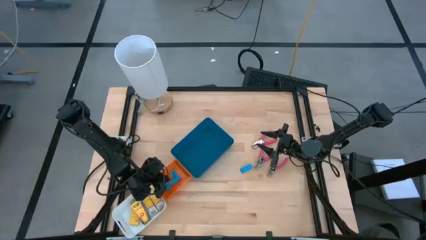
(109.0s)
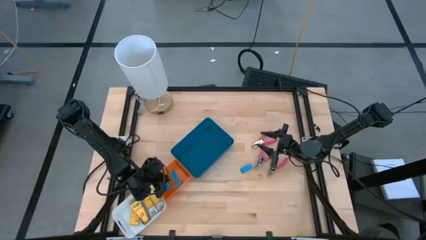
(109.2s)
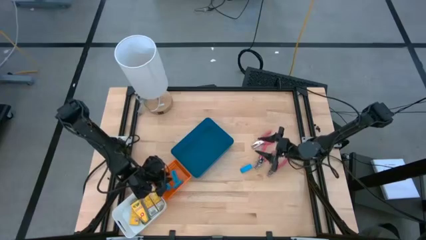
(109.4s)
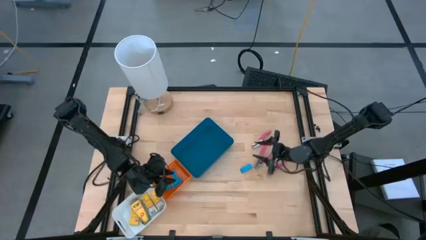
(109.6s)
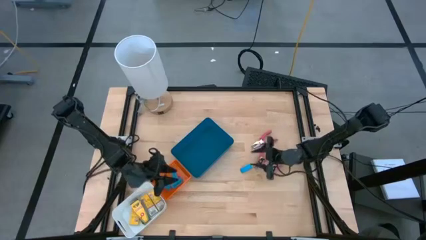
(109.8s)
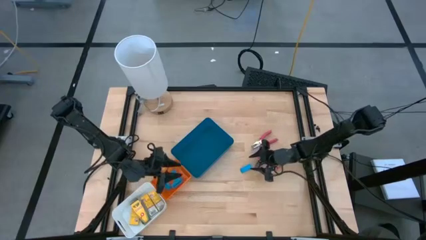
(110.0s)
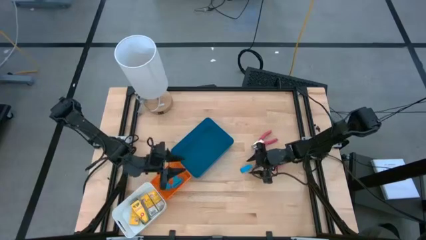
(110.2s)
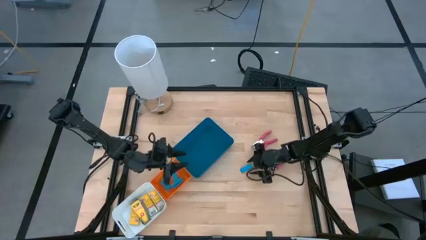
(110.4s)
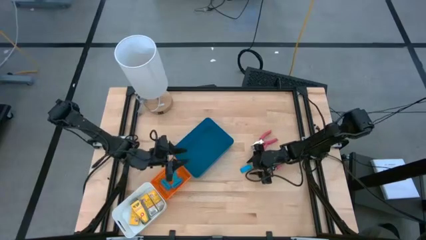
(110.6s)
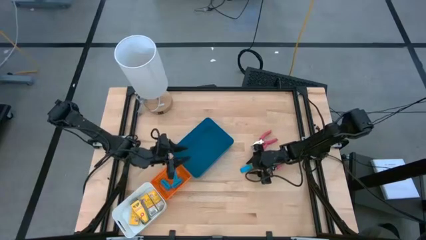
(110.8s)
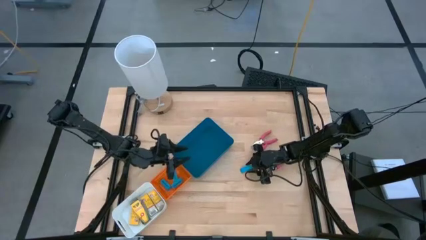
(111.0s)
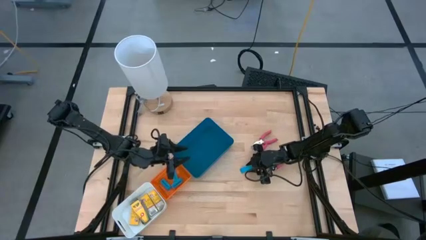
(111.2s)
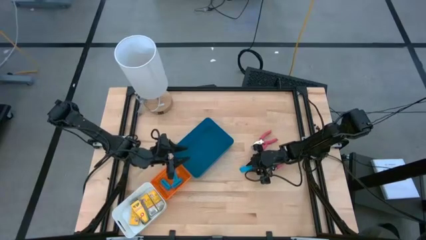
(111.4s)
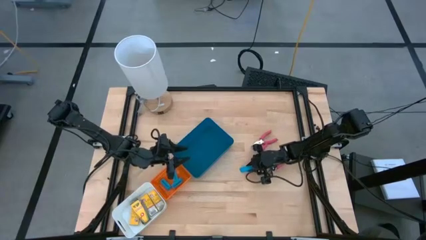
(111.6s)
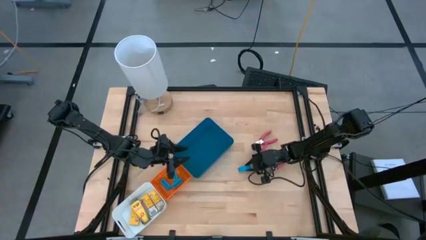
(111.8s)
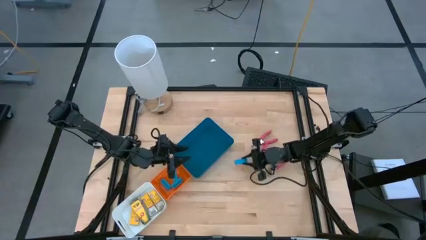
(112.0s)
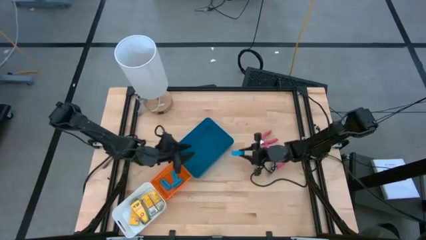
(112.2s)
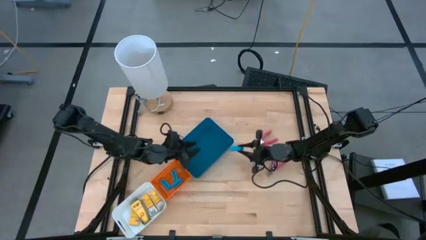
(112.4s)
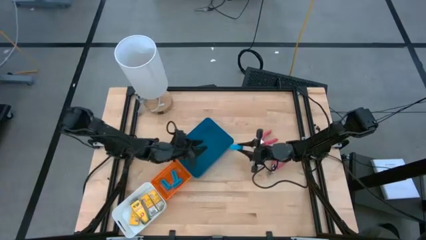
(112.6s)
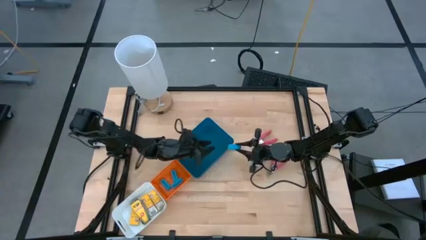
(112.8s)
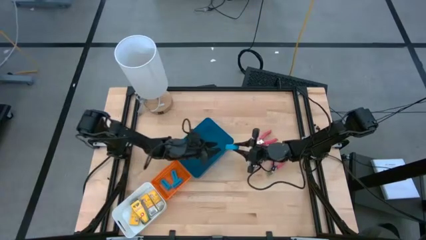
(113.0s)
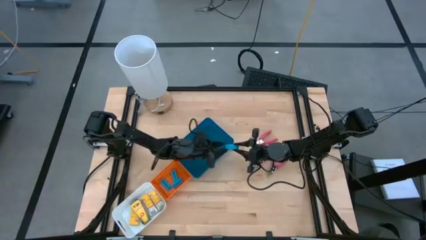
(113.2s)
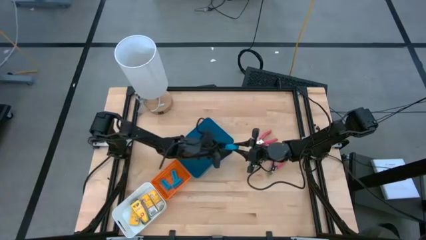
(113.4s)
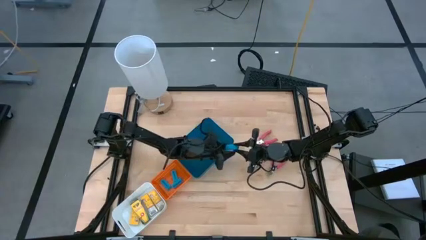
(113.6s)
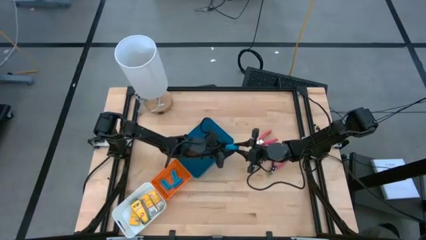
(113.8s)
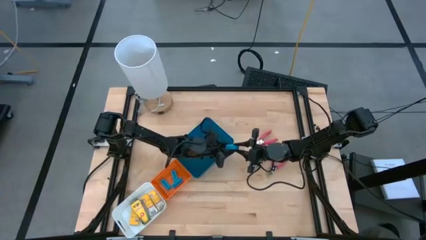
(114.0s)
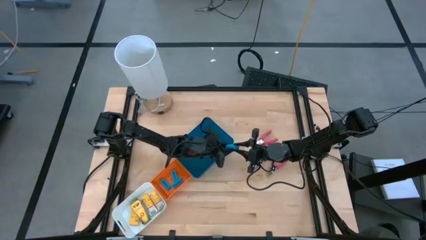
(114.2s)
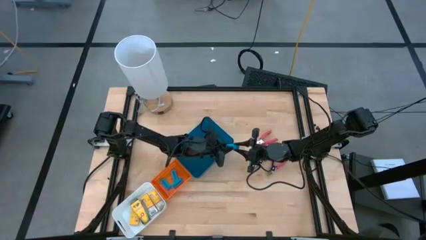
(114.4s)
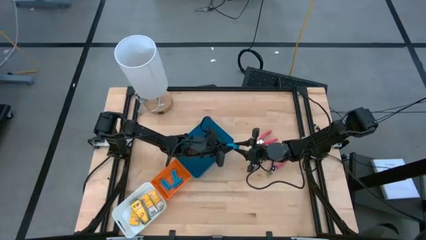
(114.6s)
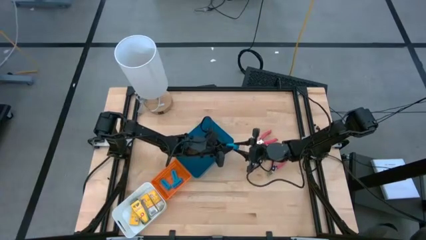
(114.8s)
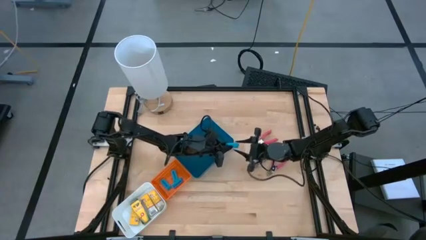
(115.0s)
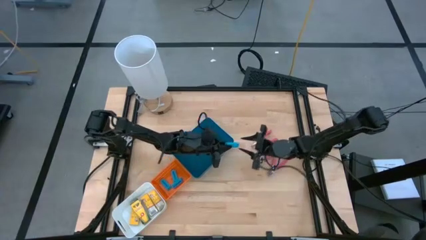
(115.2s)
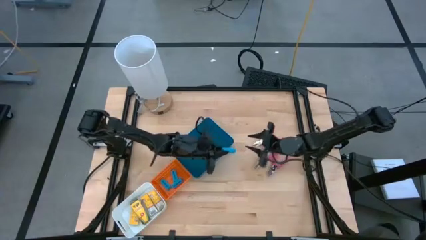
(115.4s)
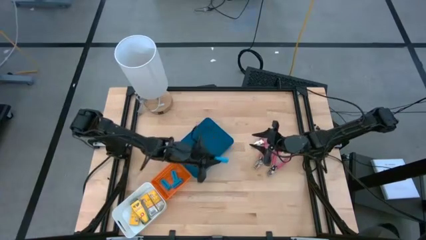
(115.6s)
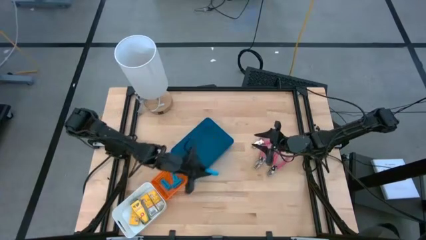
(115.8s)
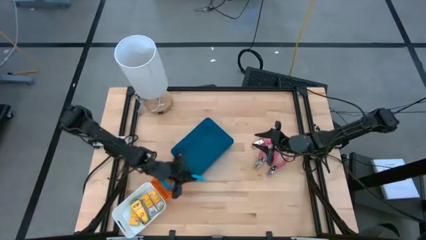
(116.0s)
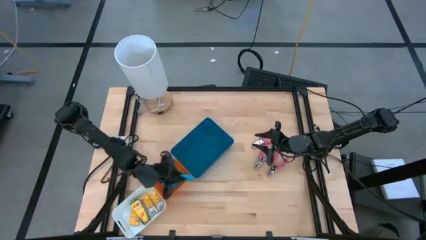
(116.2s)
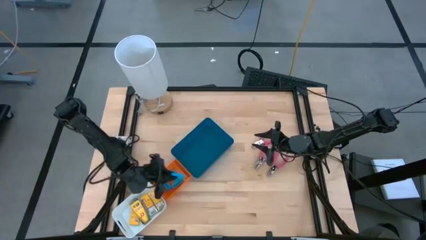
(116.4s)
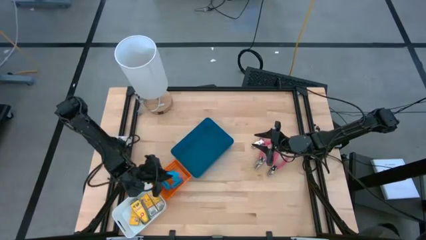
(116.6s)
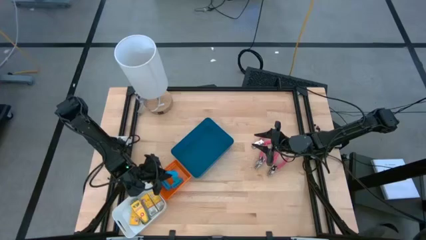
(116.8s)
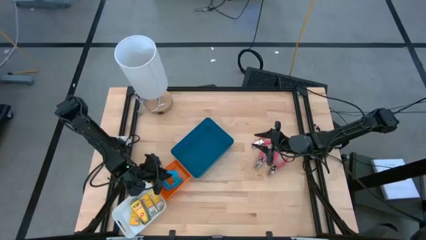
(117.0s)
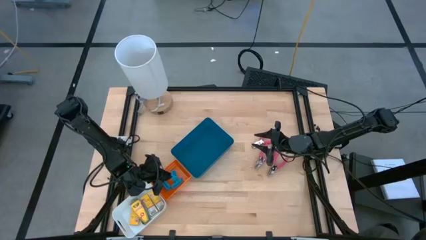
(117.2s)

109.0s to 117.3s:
Task: Pick & Place School Supplies
Put the blue eraser into the orange bin

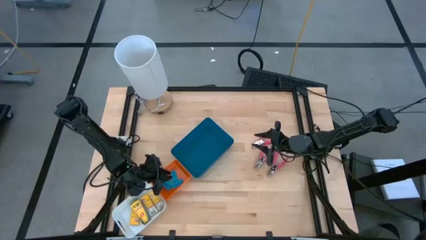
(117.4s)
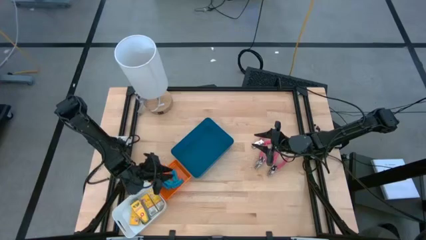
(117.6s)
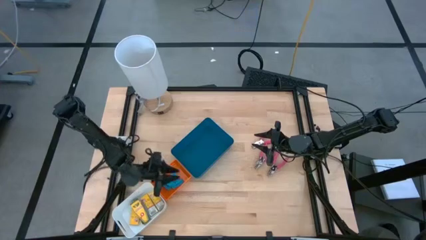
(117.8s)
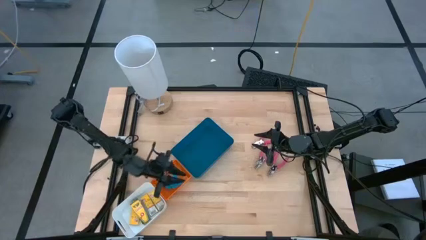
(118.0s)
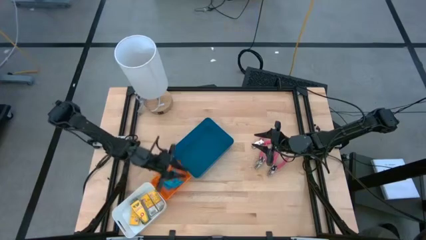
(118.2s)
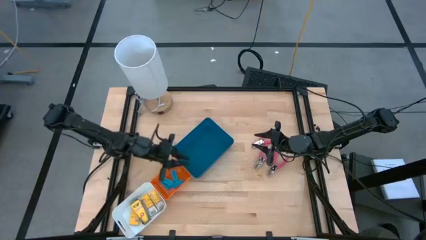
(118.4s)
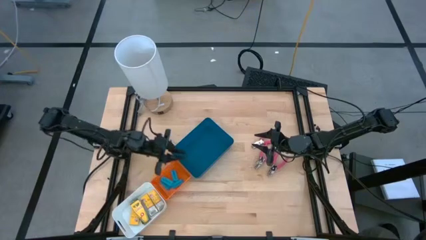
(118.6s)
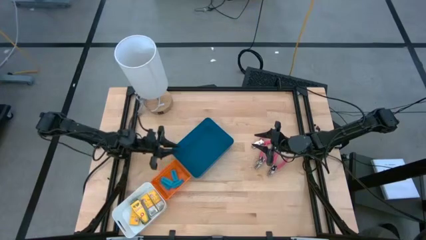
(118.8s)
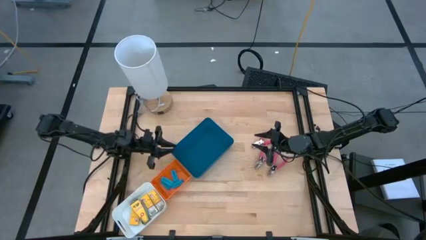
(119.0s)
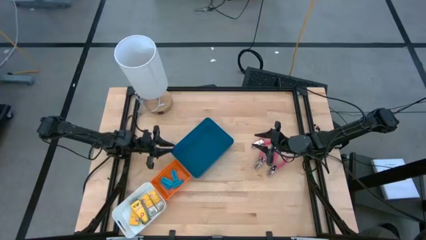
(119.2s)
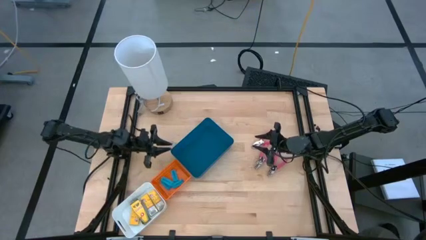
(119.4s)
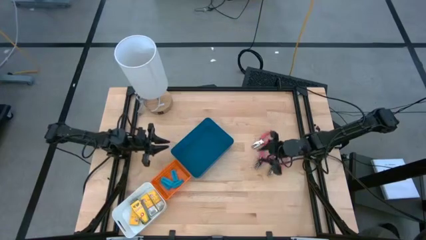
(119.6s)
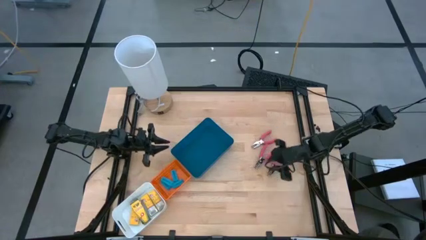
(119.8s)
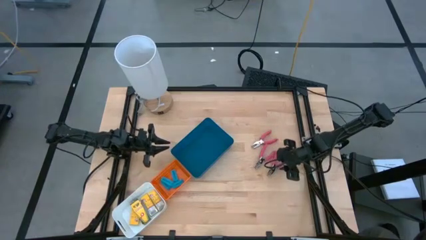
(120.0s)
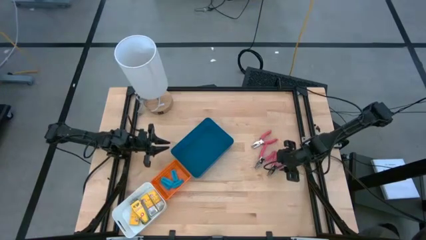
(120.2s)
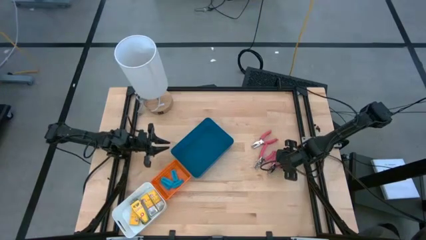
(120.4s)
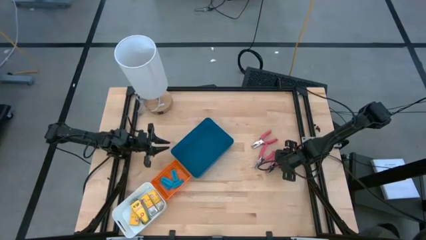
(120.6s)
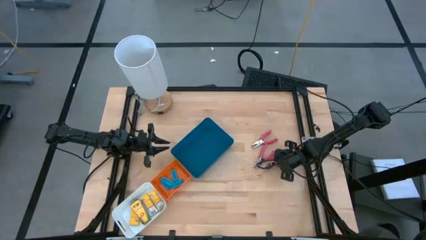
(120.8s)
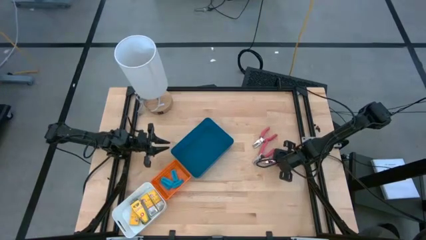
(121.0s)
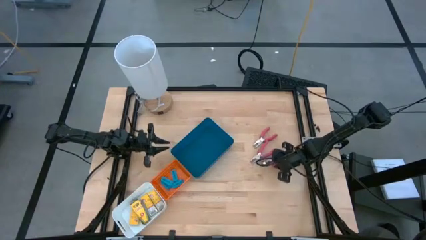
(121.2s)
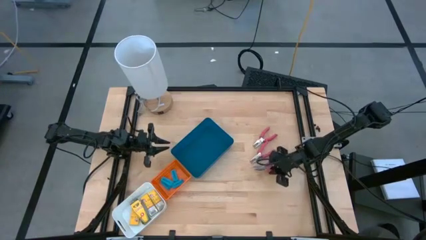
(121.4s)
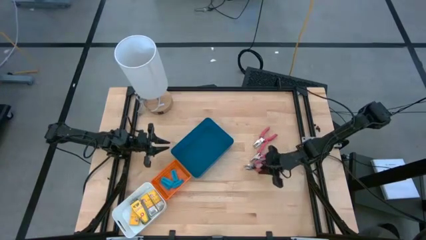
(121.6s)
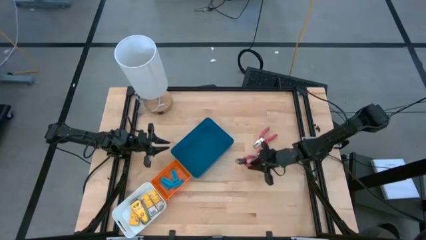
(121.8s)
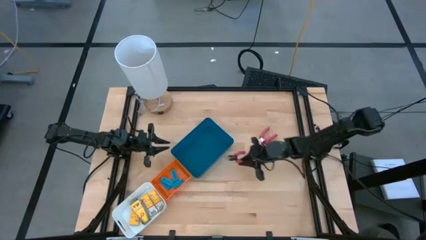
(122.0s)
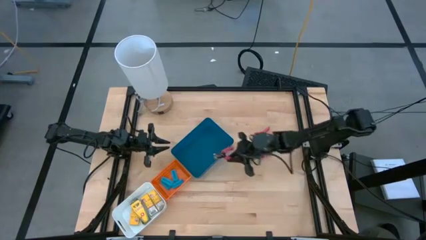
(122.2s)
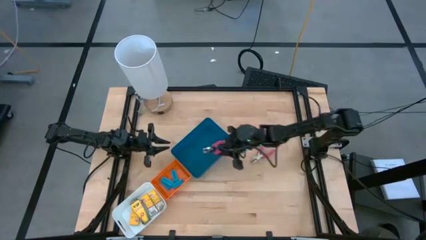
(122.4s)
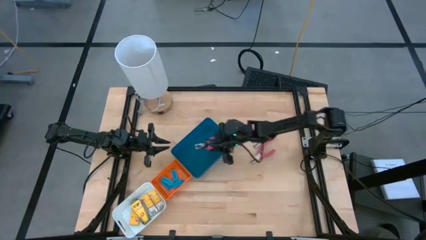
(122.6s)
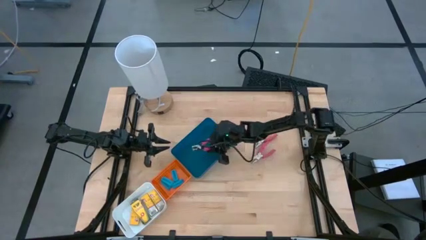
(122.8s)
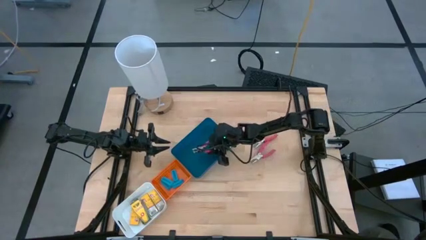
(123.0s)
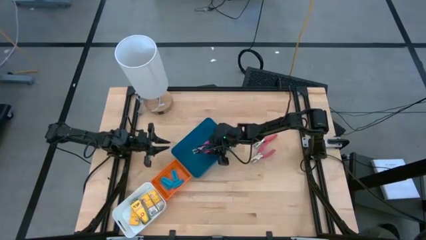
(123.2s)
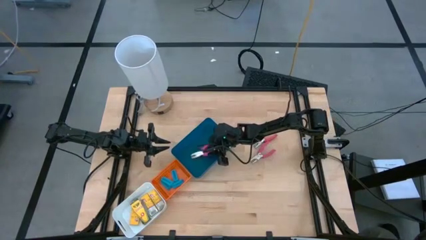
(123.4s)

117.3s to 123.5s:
Put the pink hole puncher into the blue bin

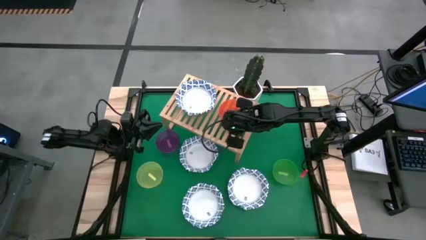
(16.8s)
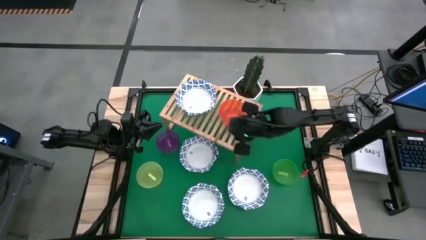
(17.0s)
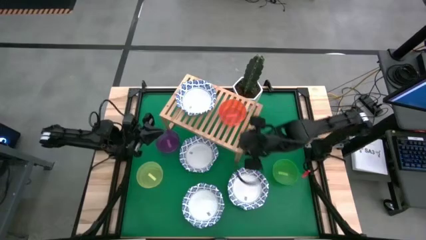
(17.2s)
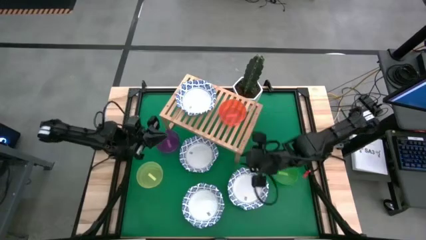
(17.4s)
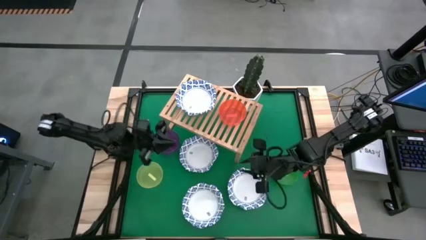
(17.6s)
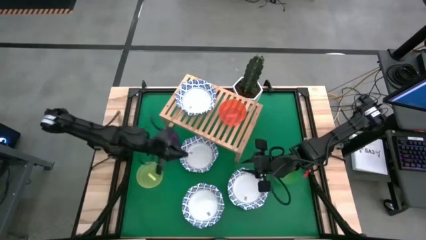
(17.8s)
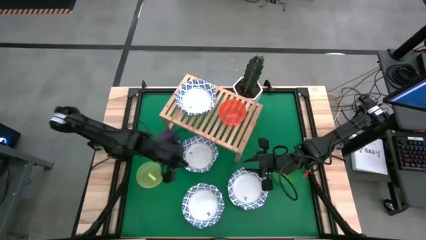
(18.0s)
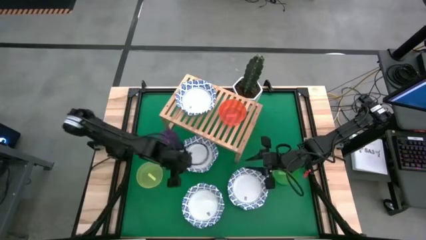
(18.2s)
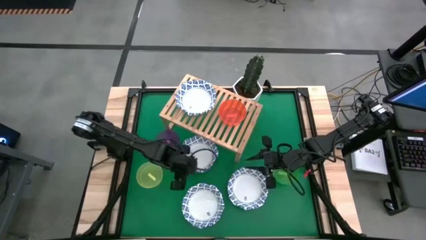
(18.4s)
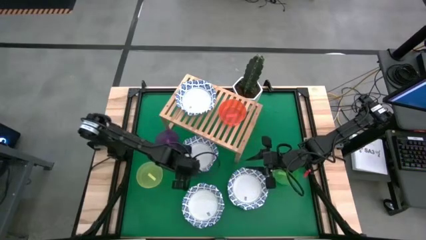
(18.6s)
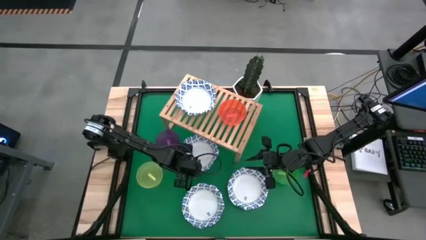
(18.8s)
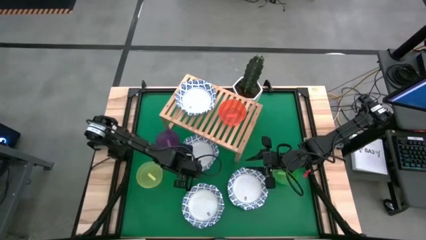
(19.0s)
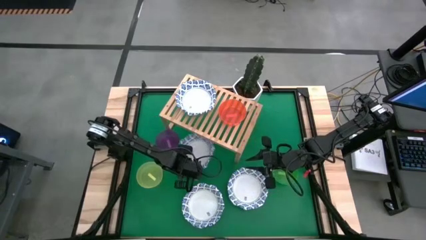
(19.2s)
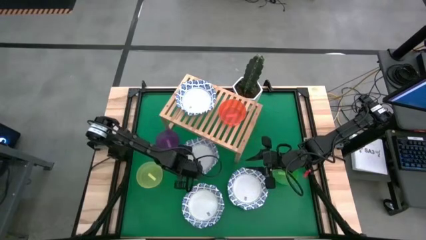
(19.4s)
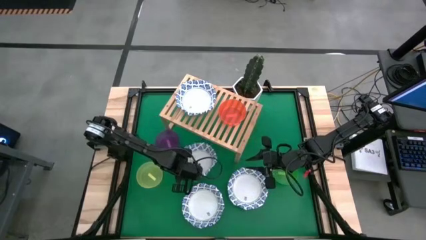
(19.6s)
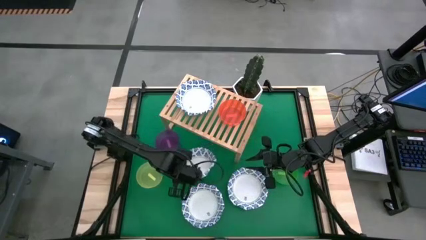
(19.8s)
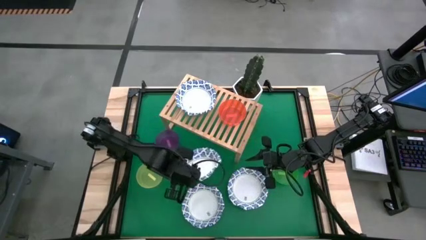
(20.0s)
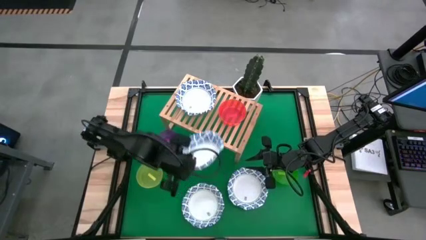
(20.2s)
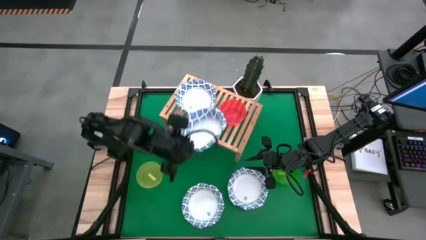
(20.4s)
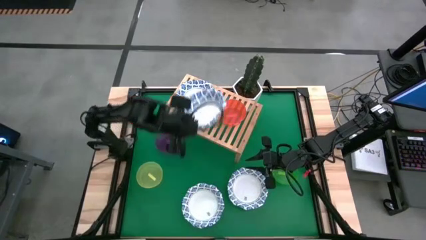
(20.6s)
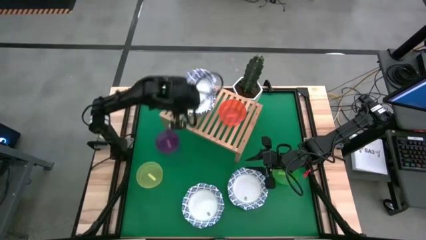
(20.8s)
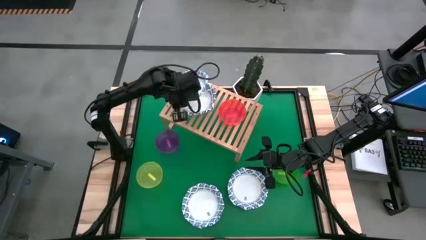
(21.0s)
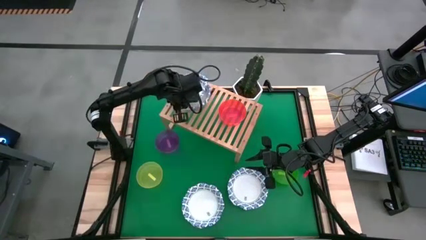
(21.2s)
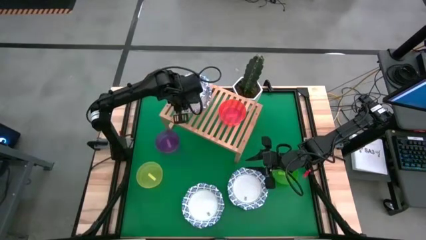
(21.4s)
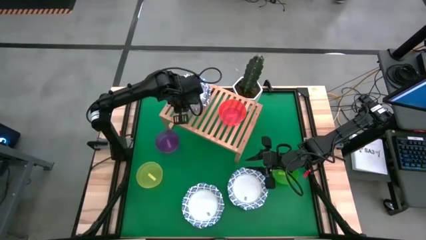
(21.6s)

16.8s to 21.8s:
Task: Place and stack bowls onto a shelf
Stack the blue and white bowl on top of the blue and white bowl on the shelf
